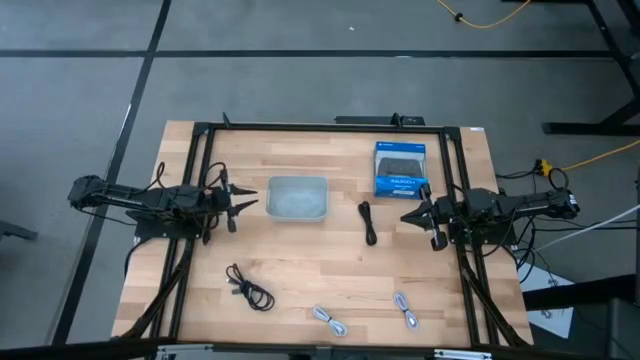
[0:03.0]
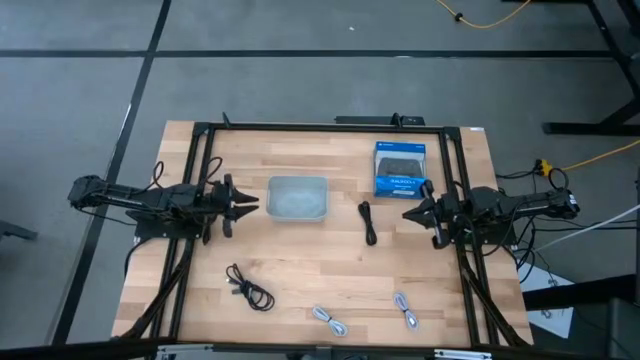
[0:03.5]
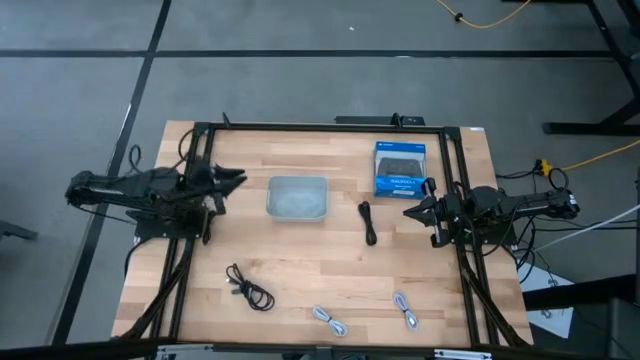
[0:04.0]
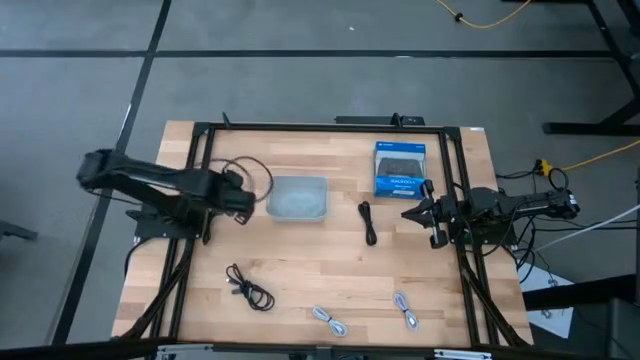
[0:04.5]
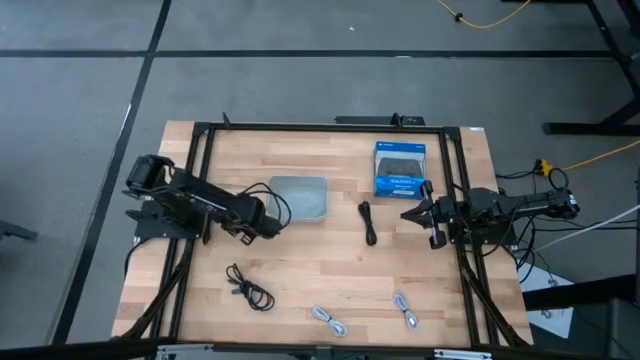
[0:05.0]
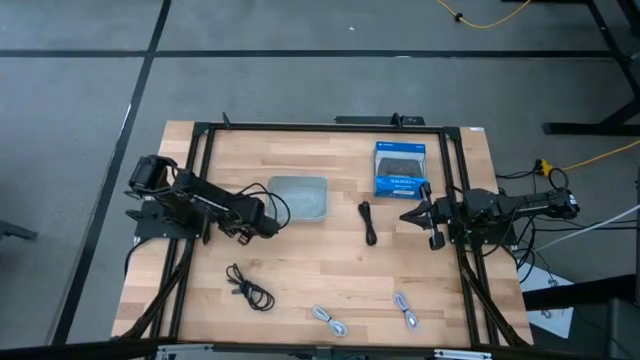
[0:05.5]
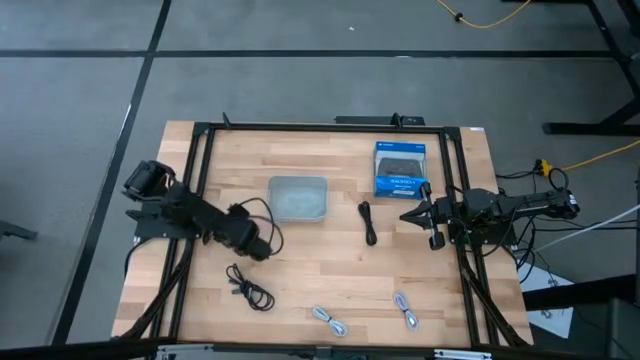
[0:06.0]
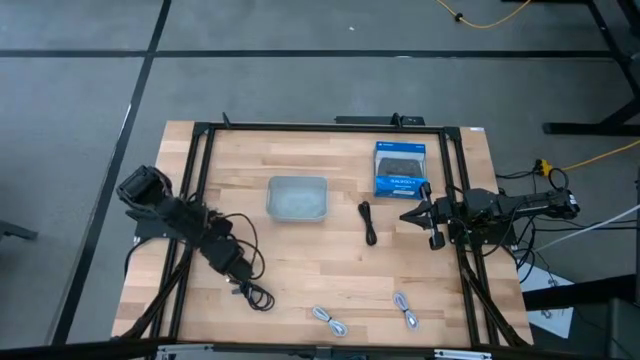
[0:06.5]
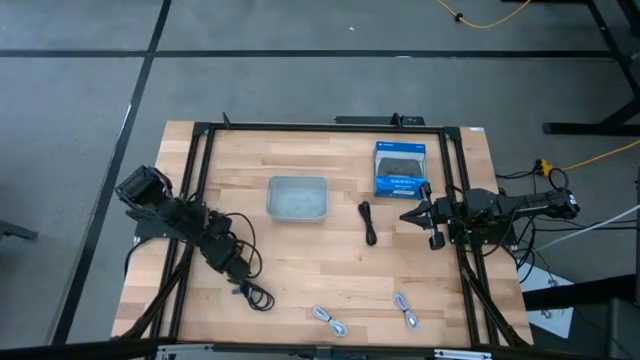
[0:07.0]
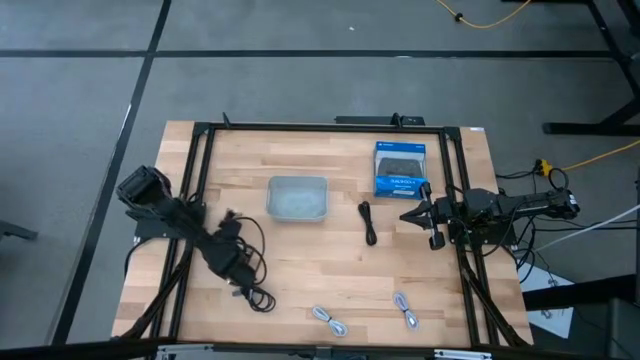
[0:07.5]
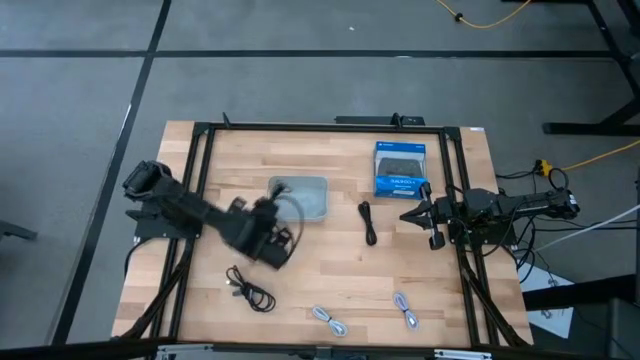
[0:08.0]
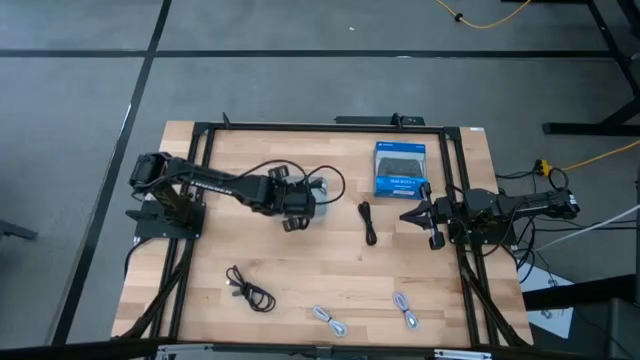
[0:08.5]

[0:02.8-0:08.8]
Task: Pick and place USB-C Cables
Put the left black charger cable into the gray container

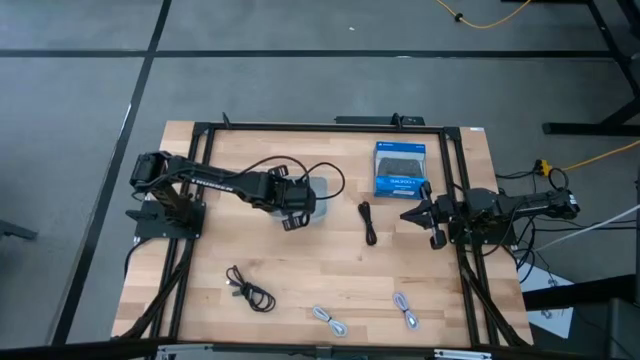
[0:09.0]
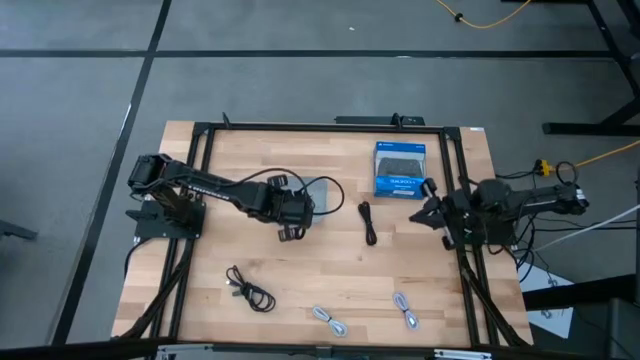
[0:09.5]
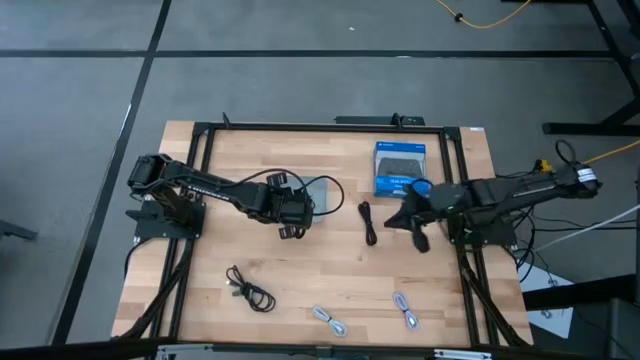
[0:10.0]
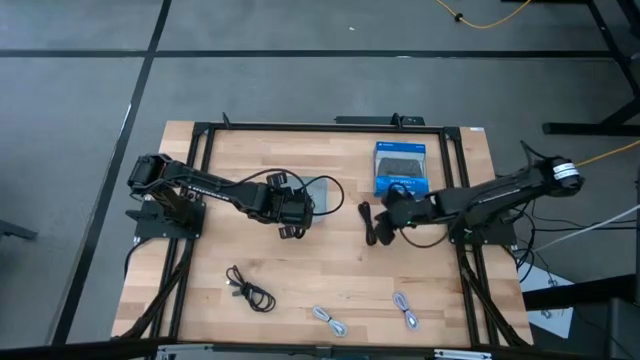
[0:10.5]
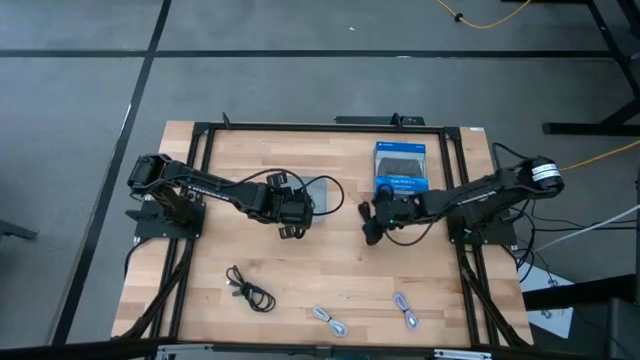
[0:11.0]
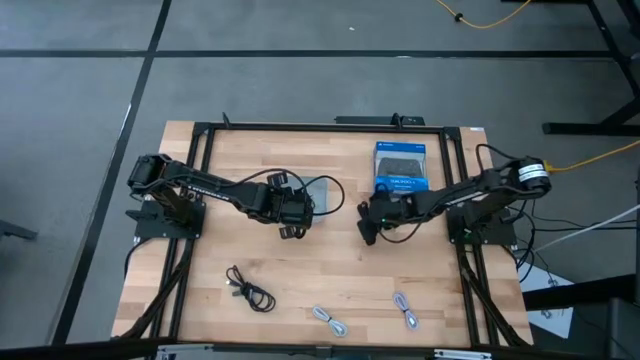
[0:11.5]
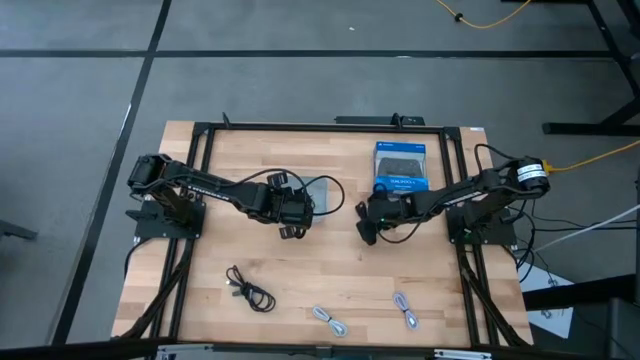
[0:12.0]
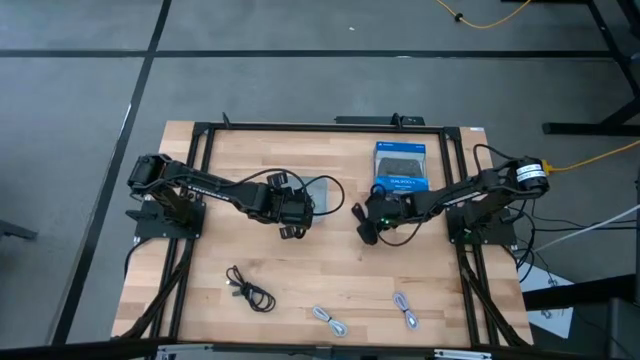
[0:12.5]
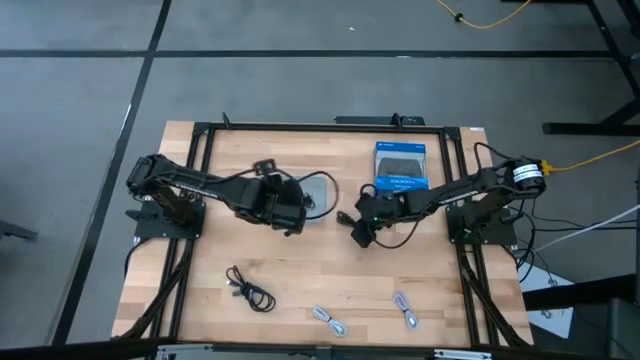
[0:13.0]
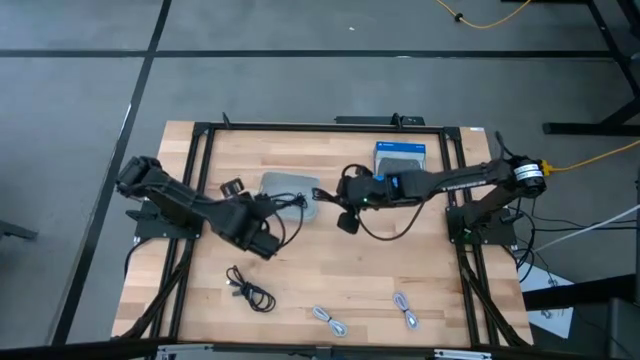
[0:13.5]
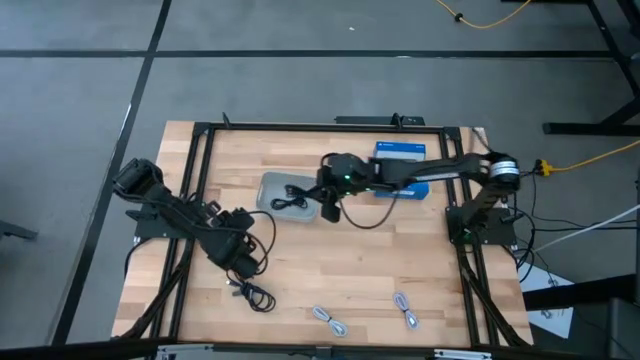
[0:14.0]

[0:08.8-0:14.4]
Put the right black charger cable into the gray container

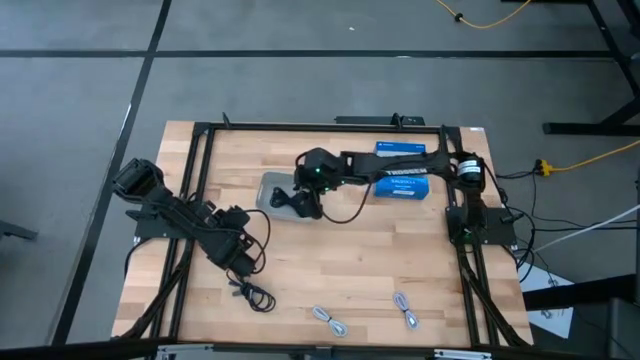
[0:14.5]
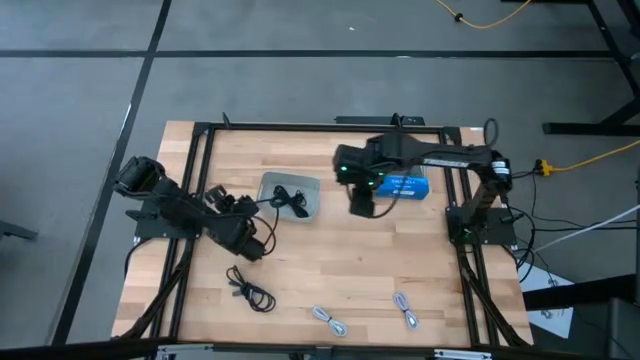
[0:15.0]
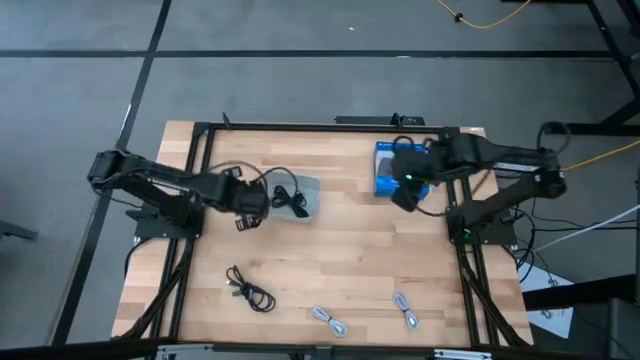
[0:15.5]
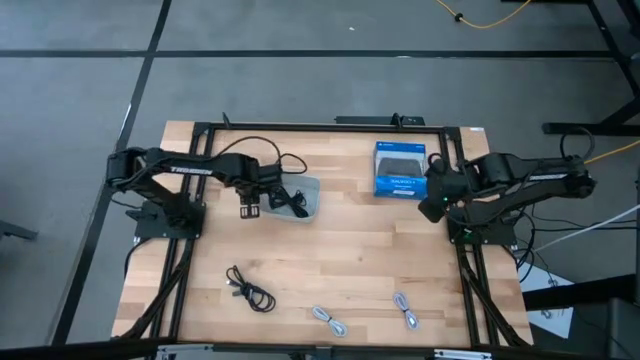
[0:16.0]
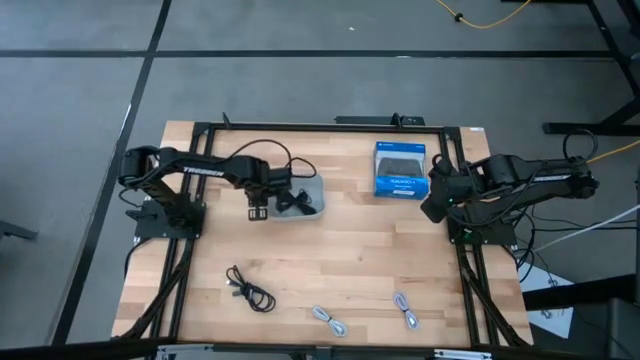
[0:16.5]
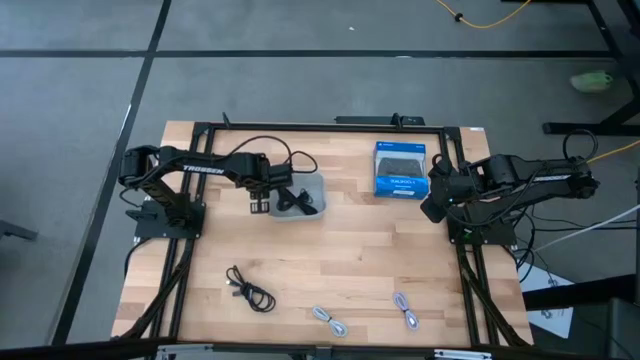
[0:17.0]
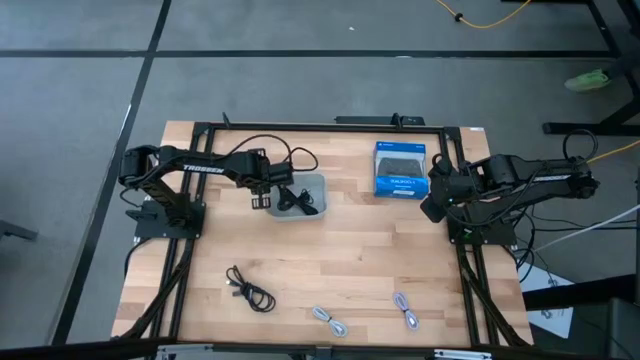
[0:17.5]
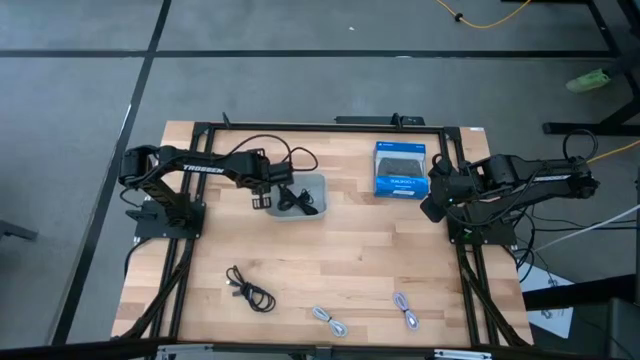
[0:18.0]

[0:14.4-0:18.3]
Adjust the gray container

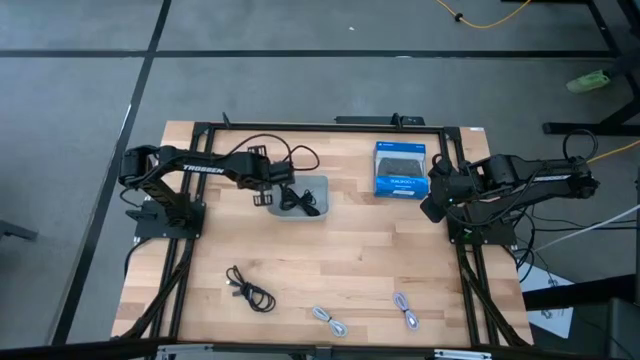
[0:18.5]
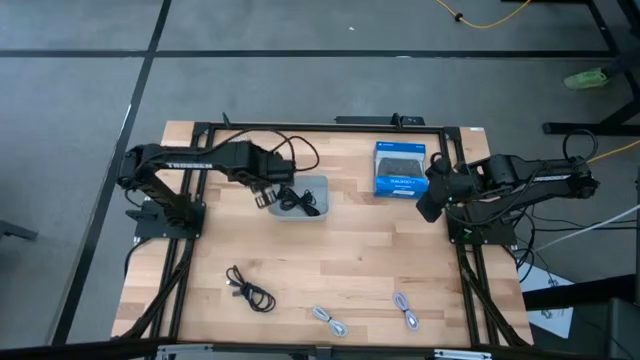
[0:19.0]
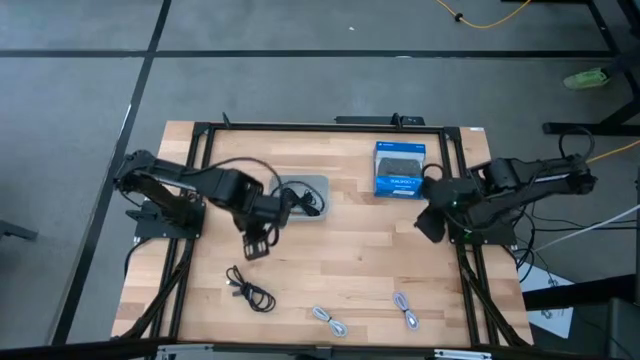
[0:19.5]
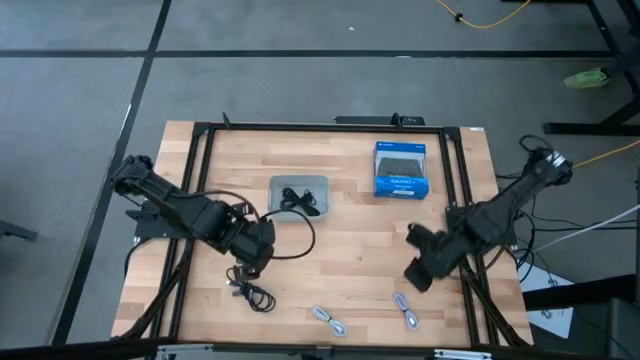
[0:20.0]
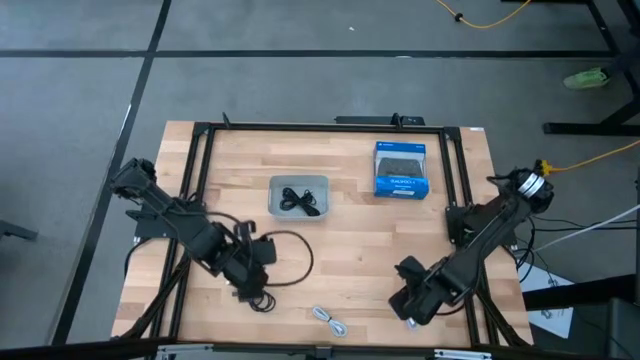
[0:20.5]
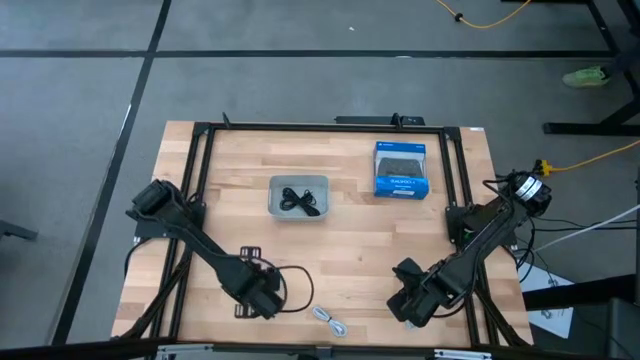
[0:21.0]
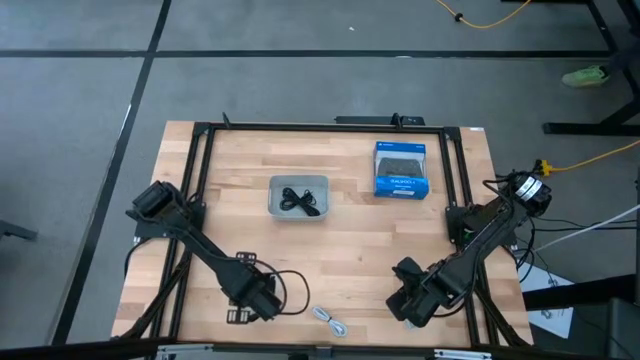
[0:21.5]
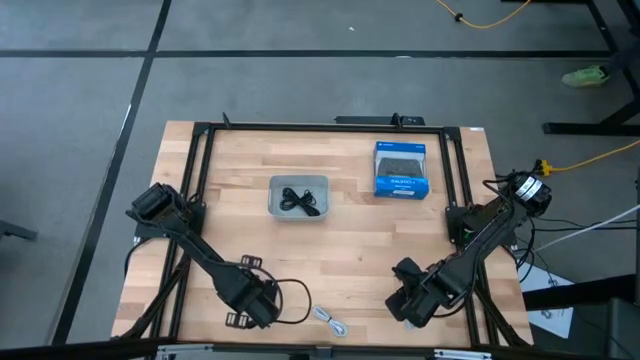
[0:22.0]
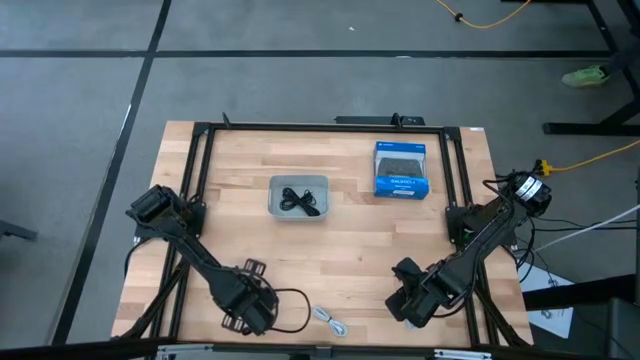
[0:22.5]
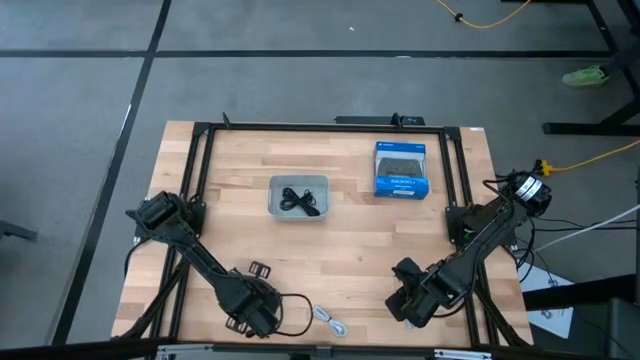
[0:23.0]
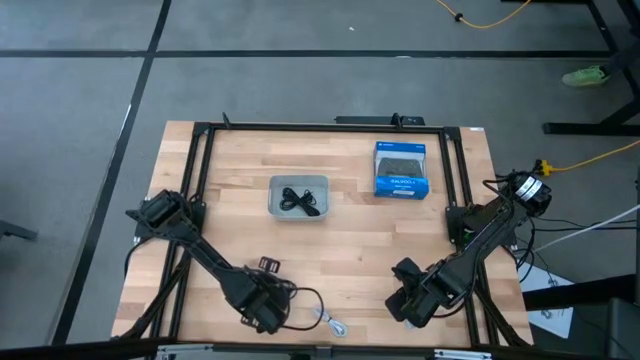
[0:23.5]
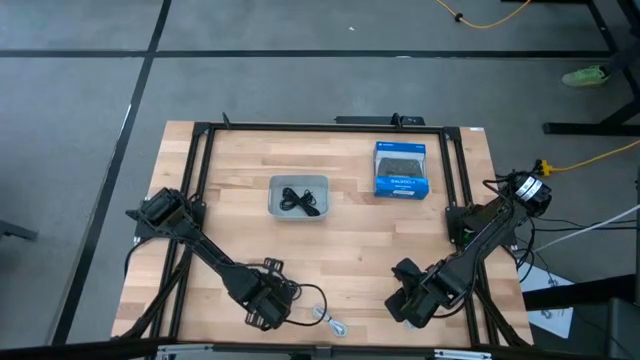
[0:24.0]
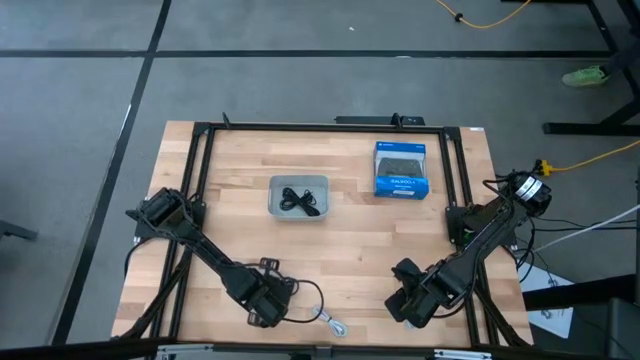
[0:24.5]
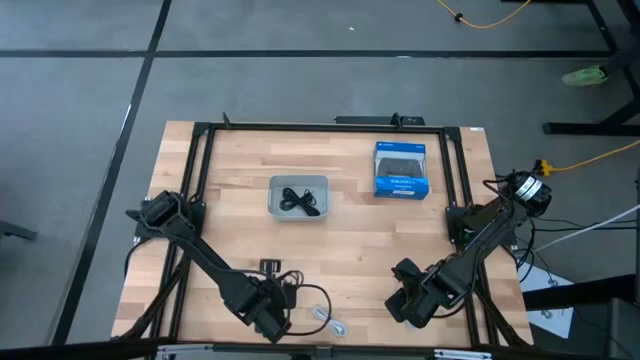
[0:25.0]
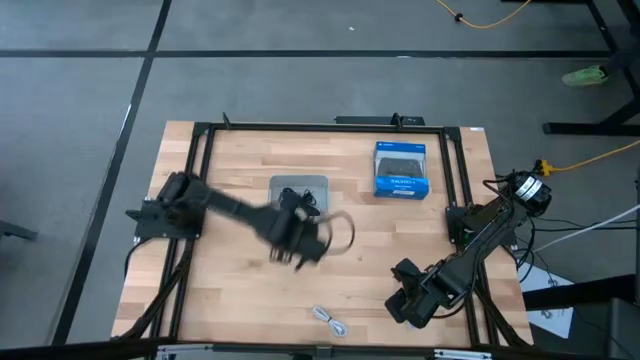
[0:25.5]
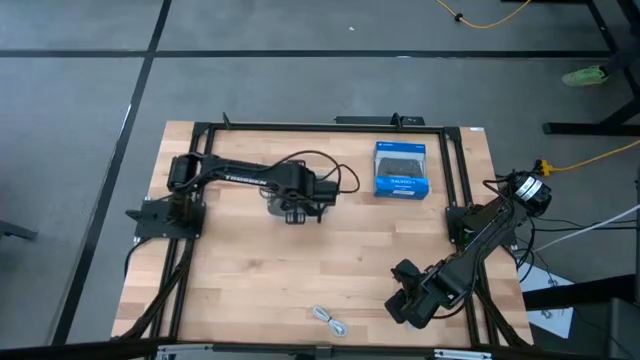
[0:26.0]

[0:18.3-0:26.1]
Put the black charger cable into the gray container
